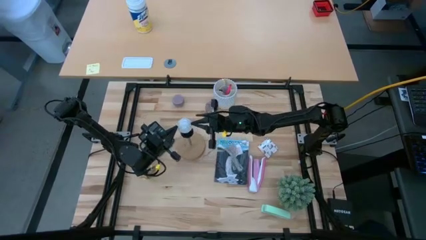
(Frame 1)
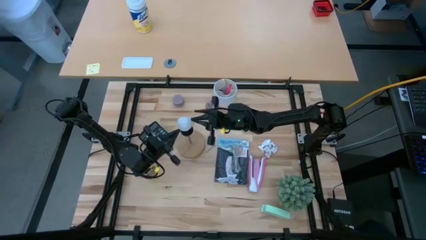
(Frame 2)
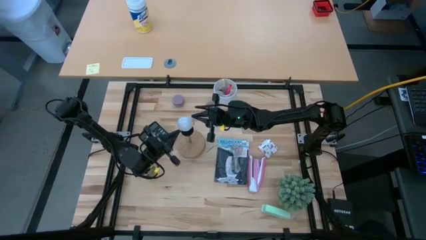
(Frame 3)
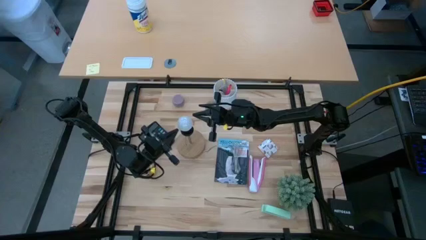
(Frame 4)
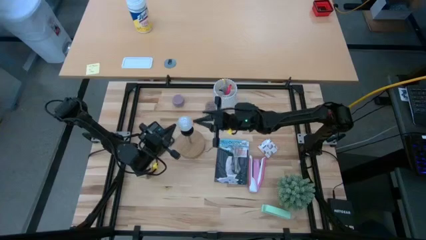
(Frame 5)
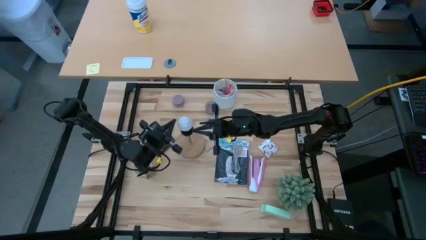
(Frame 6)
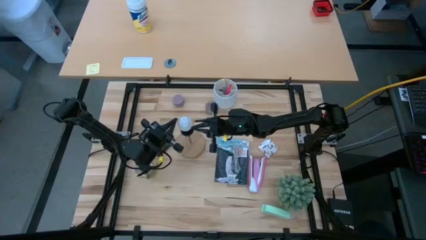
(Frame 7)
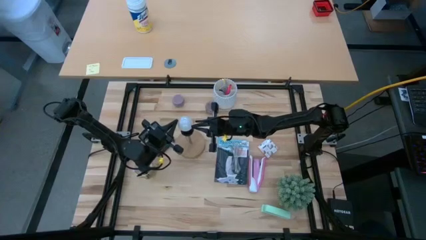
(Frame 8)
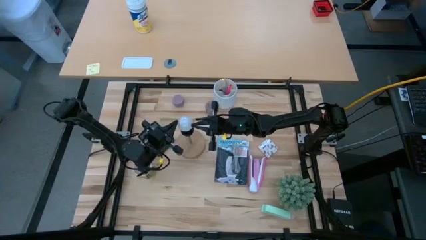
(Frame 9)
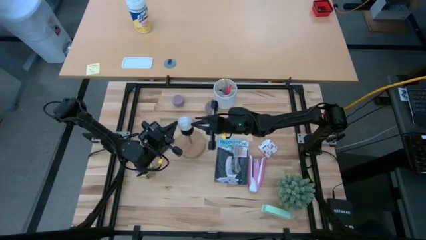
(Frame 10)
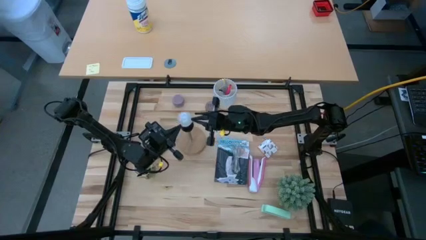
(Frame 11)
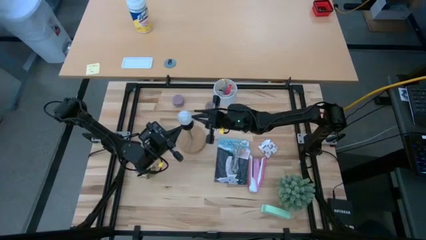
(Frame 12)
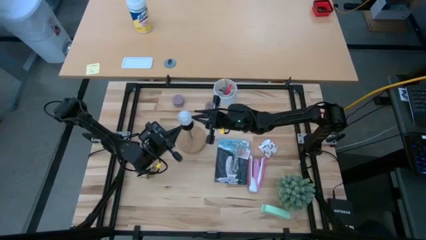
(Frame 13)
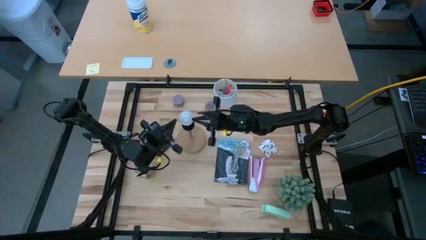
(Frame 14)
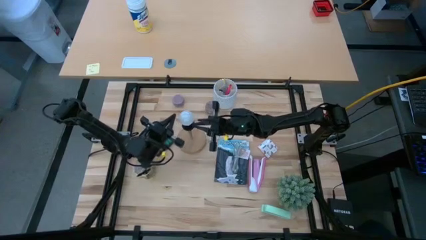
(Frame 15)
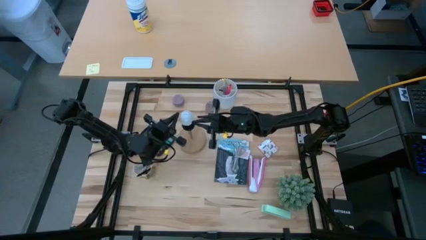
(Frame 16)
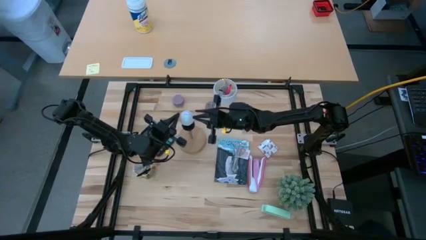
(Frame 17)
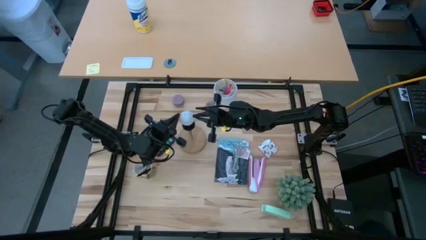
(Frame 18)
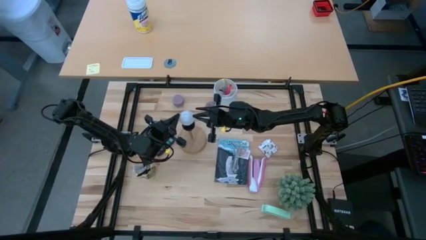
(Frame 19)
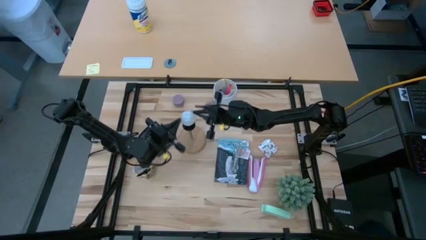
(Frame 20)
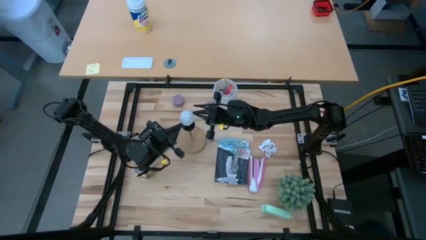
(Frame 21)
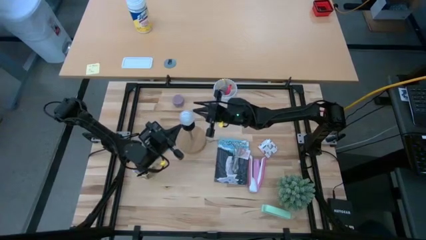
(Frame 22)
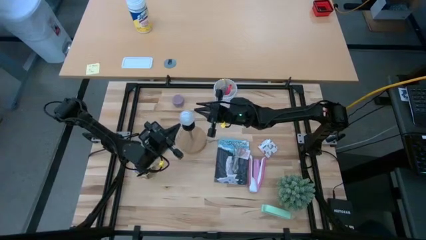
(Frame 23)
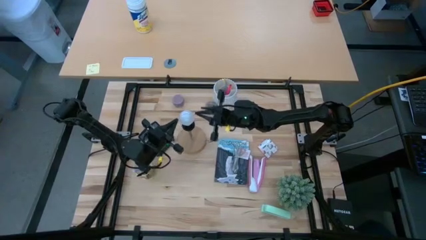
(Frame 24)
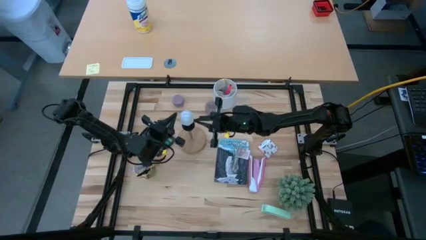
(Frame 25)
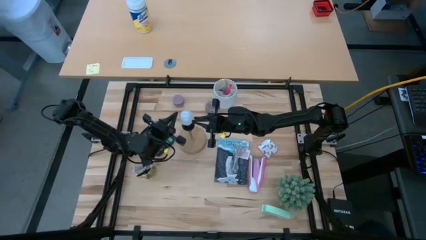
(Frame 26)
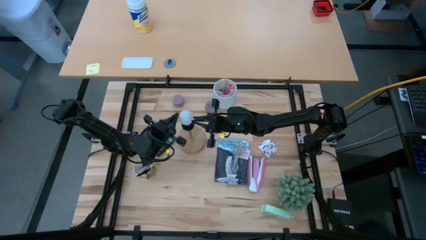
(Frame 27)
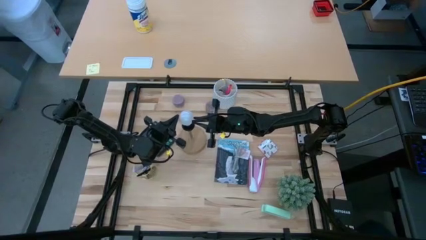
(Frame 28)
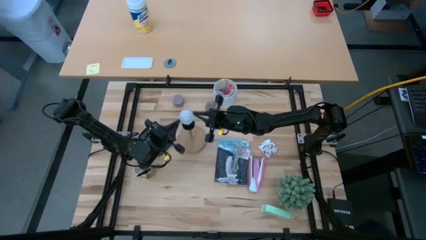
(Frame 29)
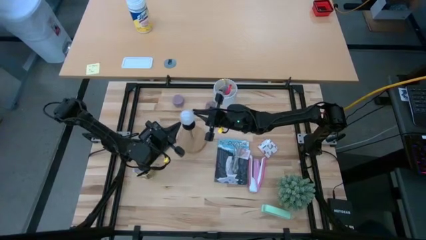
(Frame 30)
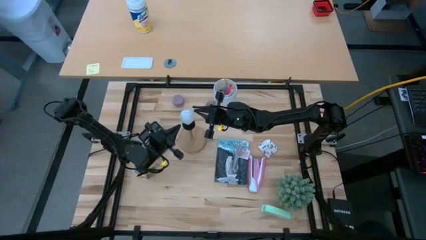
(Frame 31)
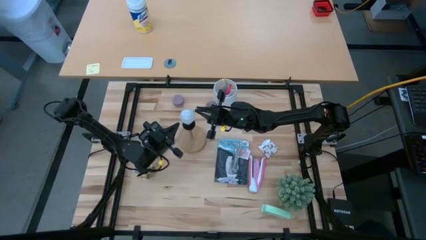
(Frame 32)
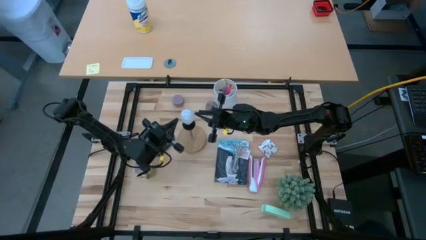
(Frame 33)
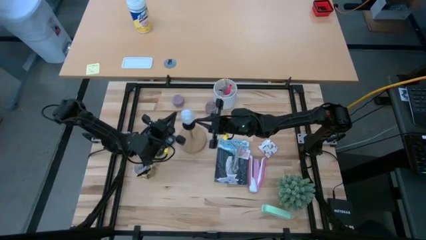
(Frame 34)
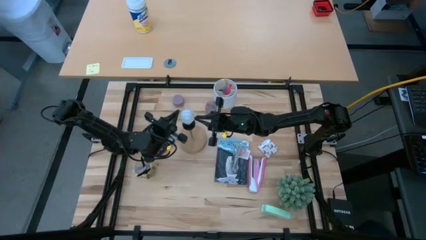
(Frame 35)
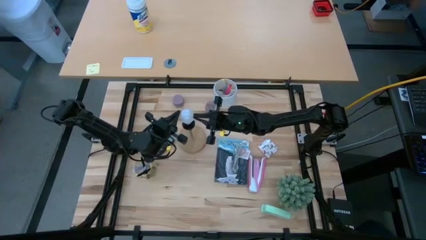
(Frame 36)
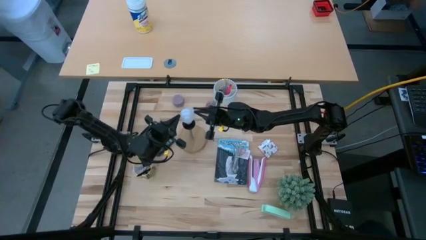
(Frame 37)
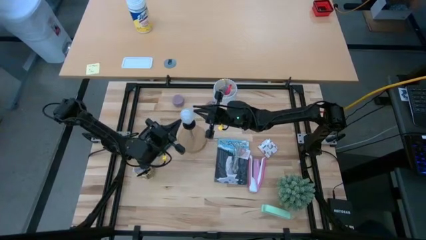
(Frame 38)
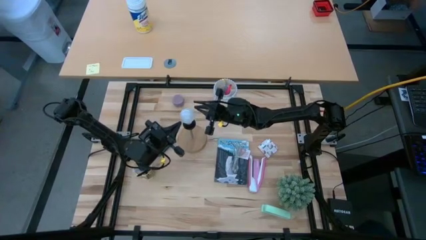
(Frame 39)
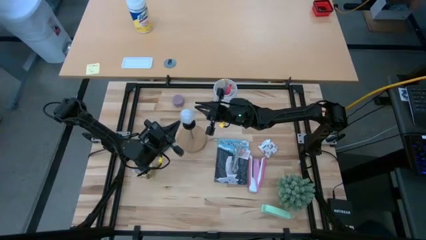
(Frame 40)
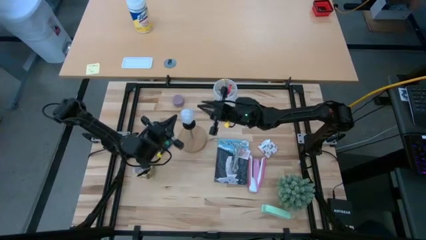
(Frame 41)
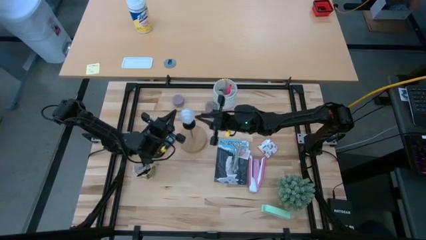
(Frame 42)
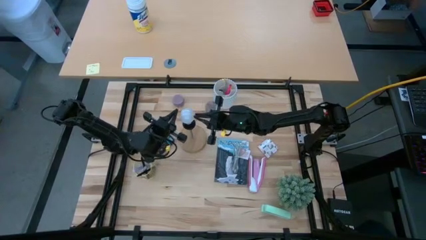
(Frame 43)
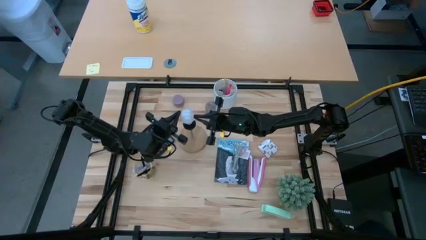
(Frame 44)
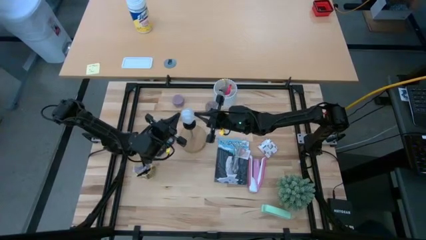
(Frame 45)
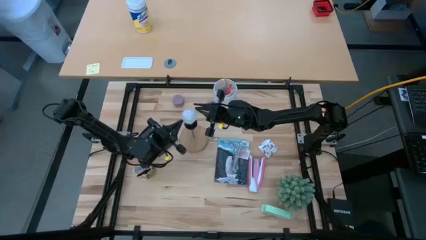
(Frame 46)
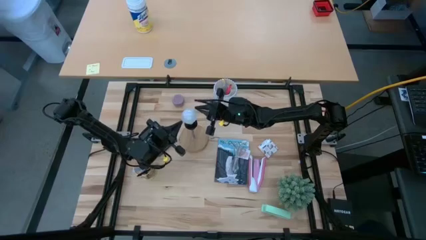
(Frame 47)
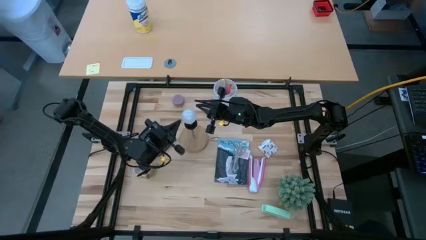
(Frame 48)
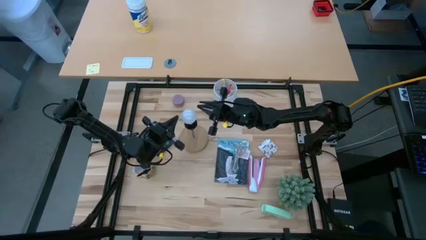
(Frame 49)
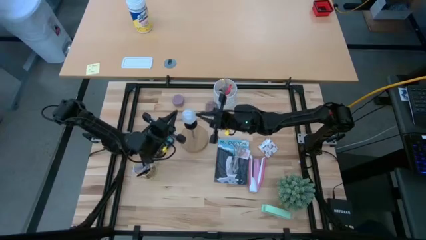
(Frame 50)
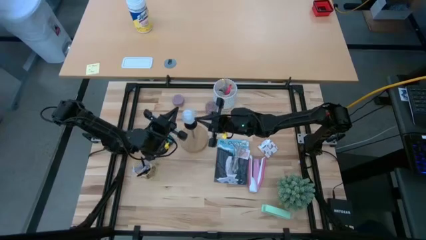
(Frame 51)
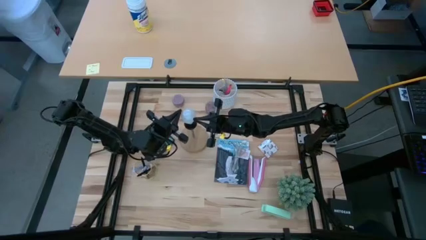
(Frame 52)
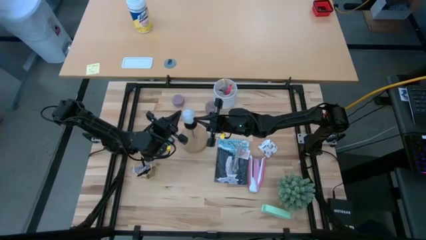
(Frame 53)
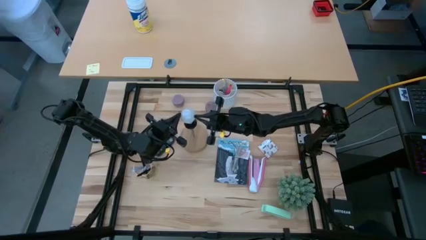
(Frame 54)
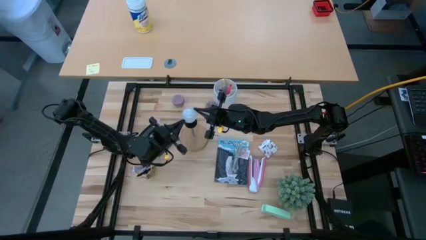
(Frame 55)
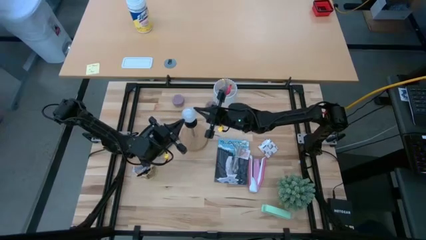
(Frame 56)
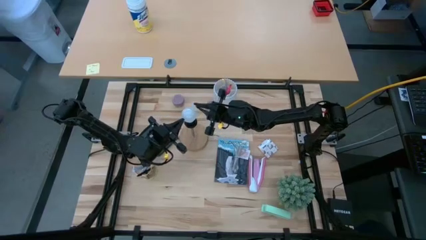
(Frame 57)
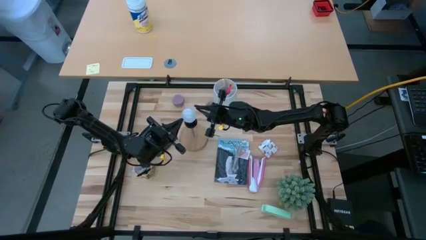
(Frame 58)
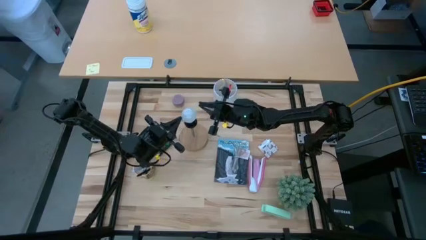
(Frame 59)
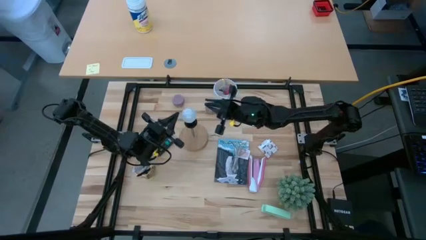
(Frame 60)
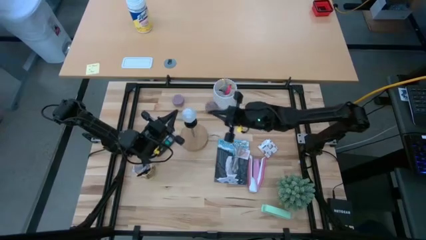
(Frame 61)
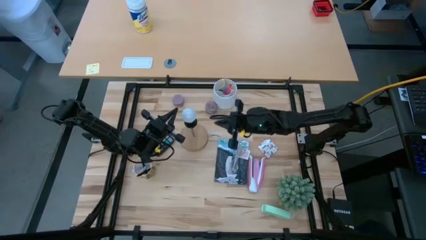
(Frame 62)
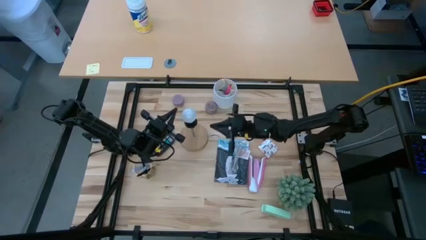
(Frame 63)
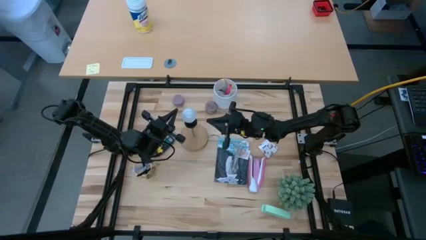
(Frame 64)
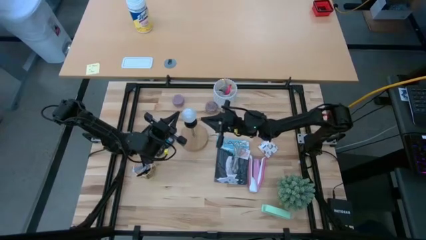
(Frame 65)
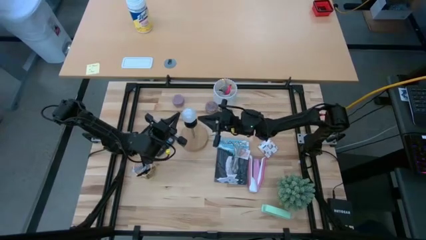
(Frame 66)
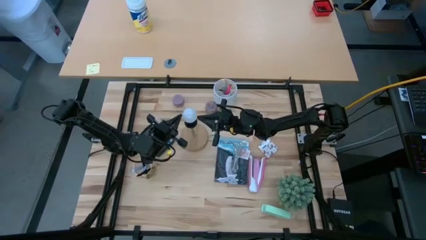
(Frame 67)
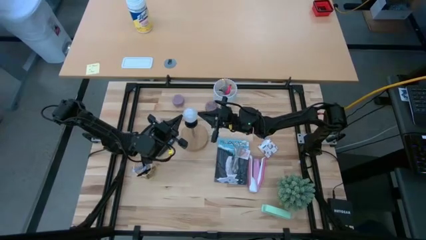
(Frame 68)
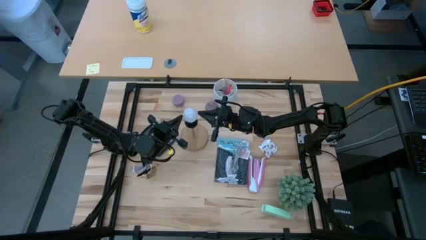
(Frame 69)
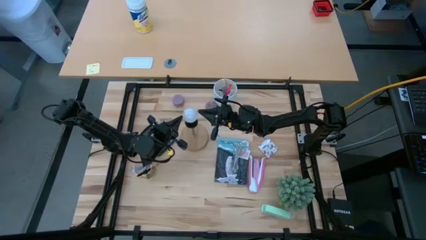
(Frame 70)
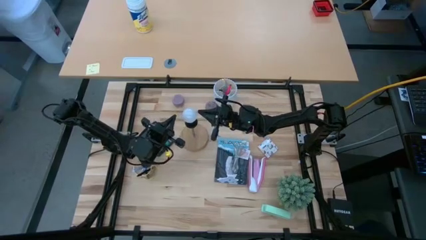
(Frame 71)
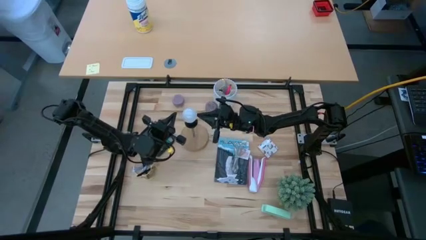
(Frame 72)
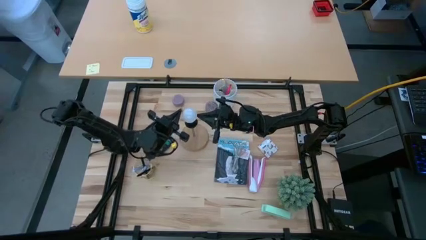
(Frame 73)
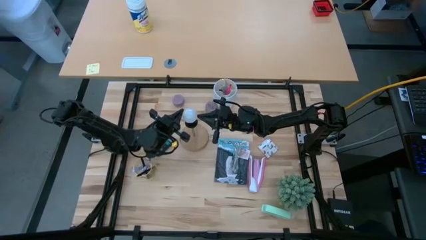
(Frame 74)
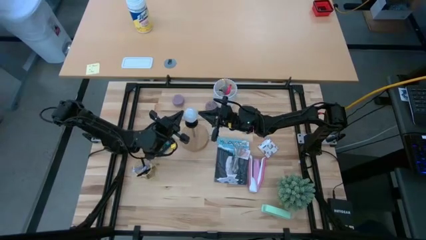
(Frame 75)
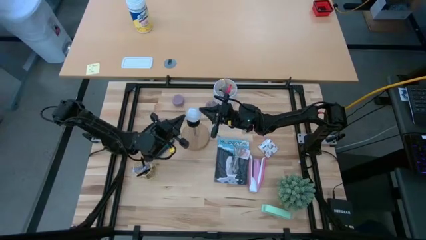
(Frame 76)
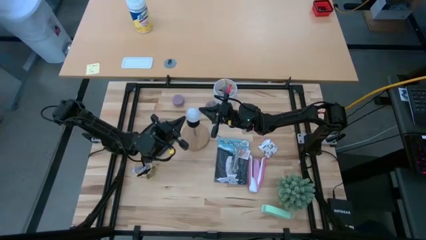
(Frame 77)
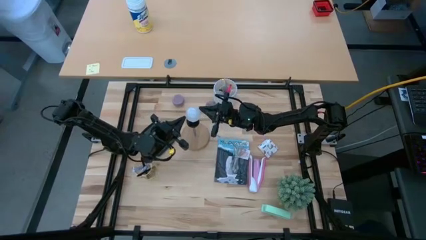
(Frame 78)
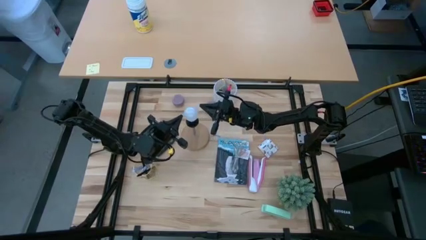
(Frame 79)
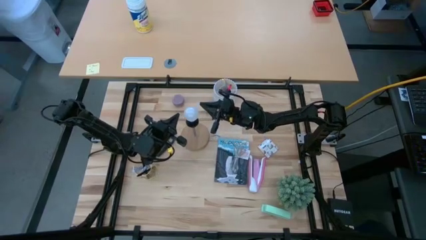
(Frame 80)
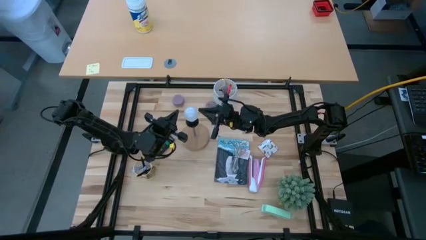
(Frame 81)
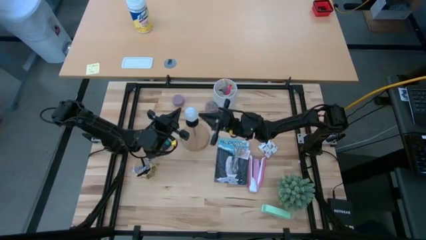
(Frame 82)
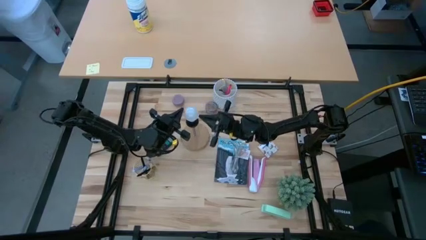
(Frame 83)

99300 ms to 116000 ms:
Task: Screw lightbulb
Remove the lightbulb from the lamp
